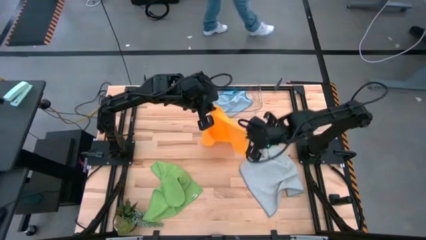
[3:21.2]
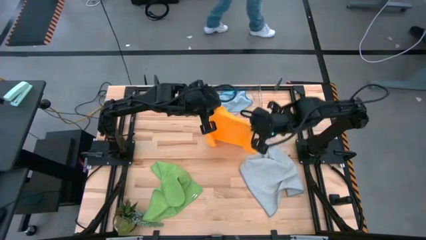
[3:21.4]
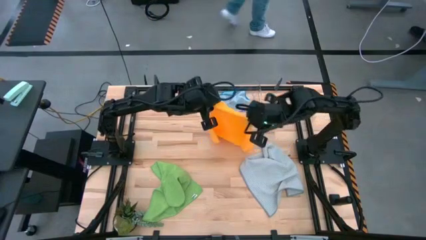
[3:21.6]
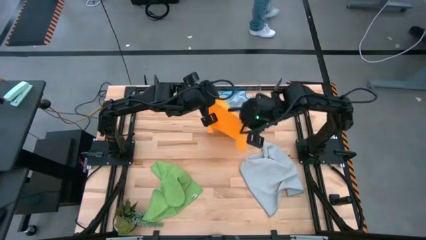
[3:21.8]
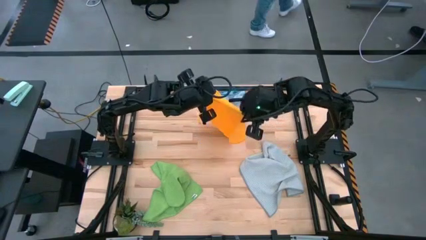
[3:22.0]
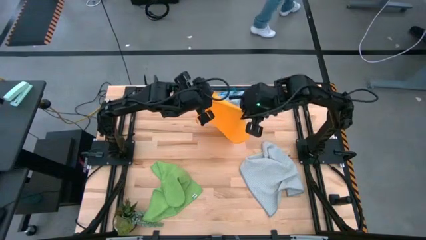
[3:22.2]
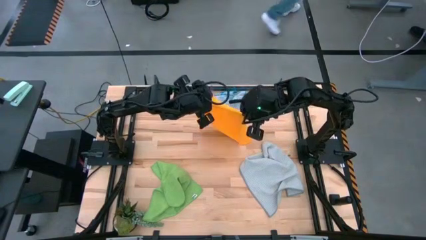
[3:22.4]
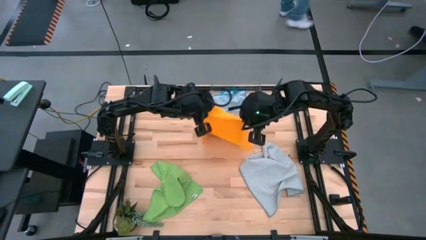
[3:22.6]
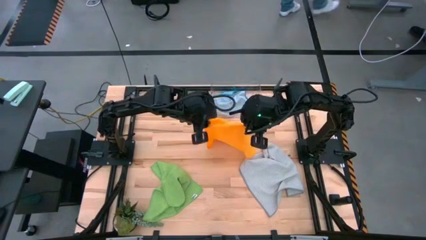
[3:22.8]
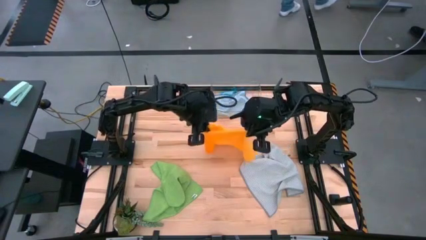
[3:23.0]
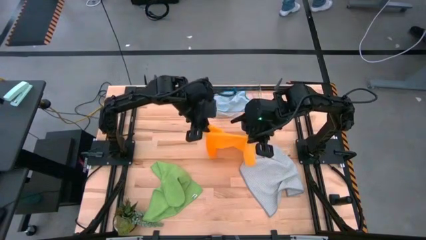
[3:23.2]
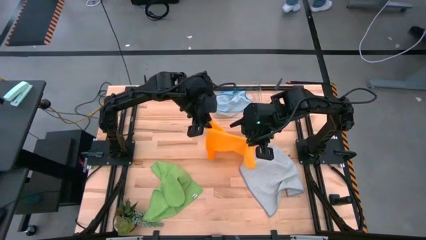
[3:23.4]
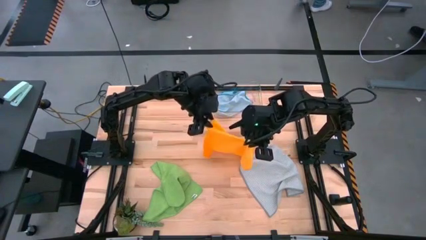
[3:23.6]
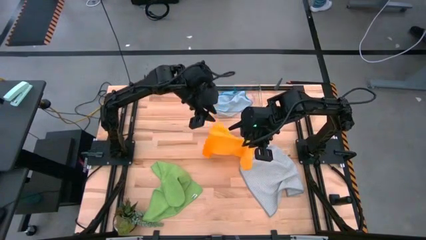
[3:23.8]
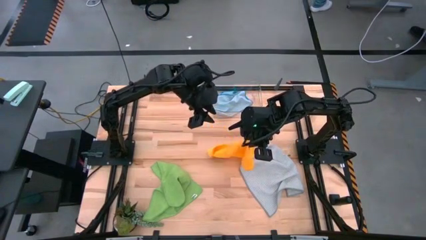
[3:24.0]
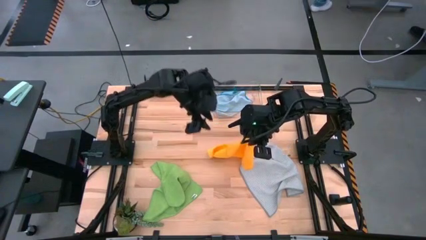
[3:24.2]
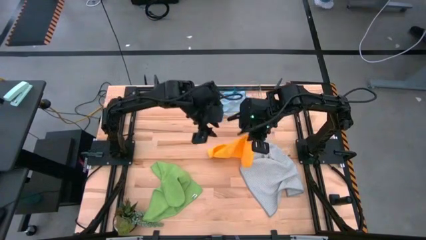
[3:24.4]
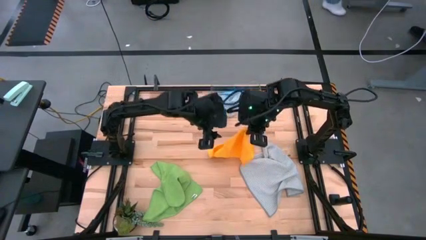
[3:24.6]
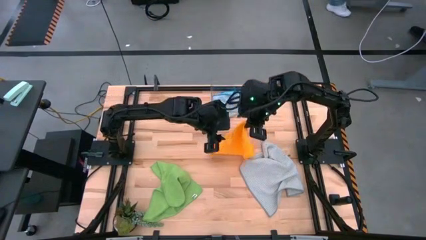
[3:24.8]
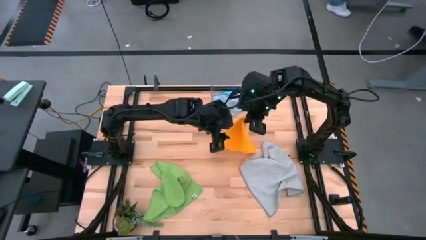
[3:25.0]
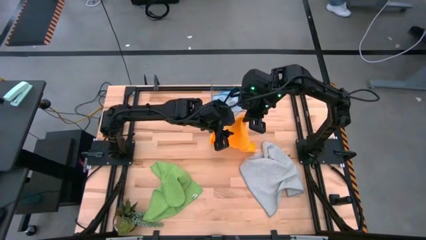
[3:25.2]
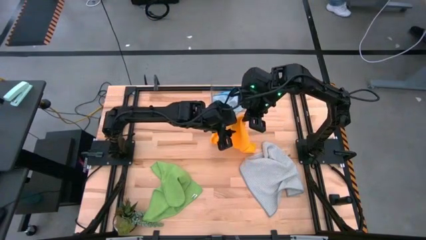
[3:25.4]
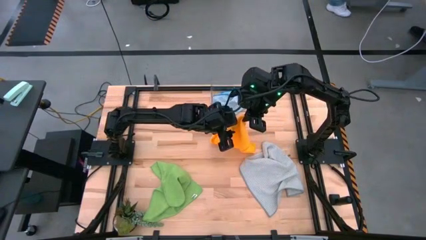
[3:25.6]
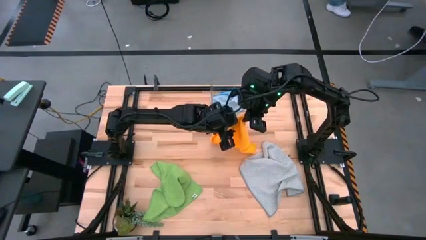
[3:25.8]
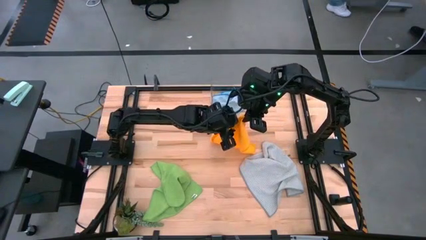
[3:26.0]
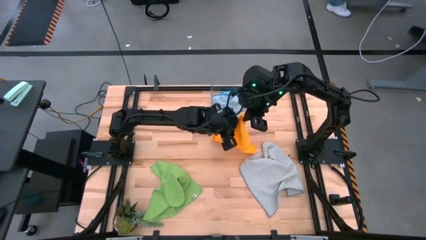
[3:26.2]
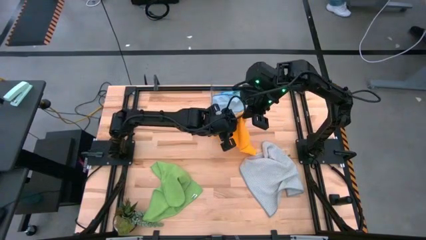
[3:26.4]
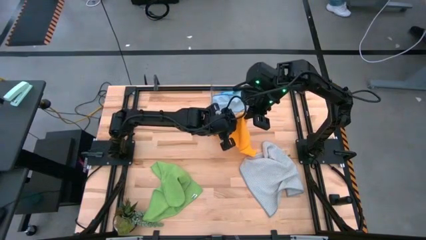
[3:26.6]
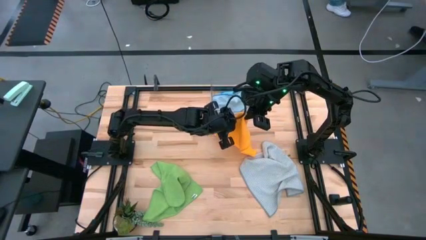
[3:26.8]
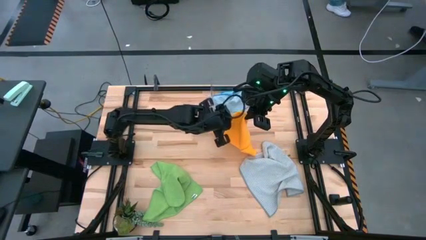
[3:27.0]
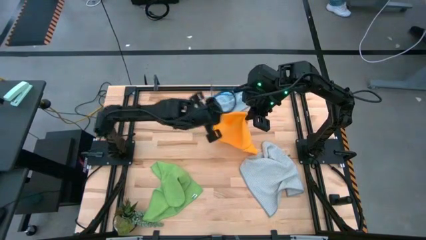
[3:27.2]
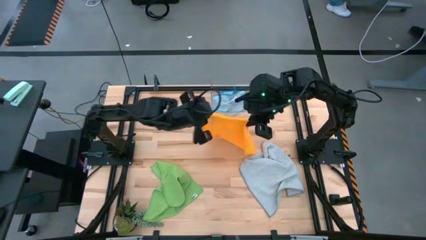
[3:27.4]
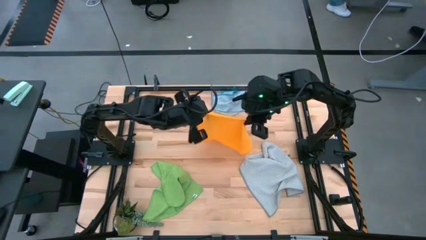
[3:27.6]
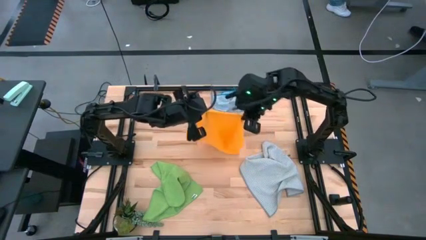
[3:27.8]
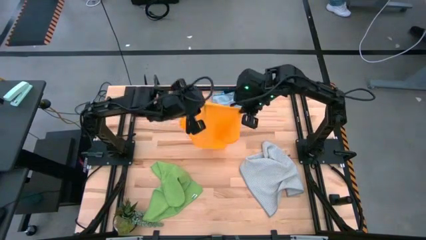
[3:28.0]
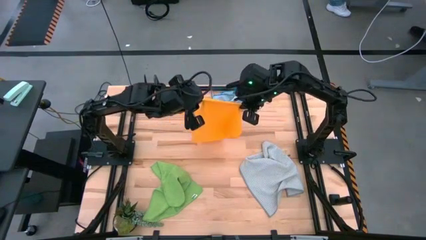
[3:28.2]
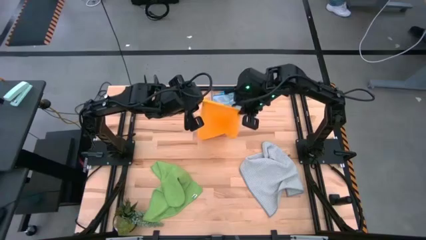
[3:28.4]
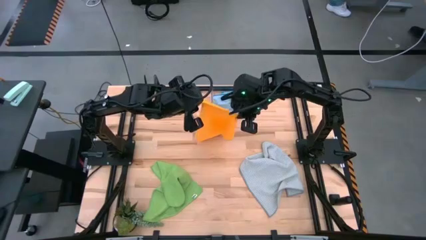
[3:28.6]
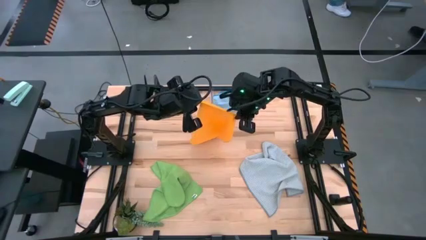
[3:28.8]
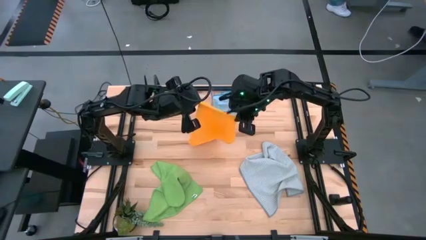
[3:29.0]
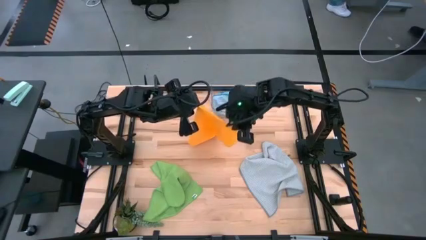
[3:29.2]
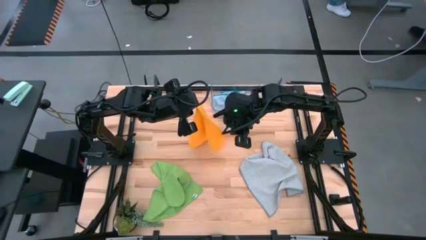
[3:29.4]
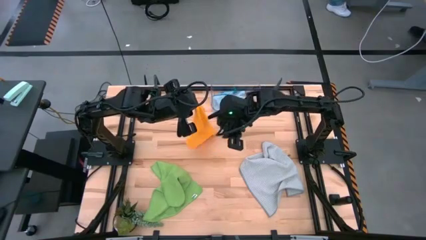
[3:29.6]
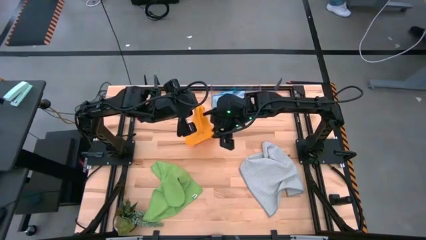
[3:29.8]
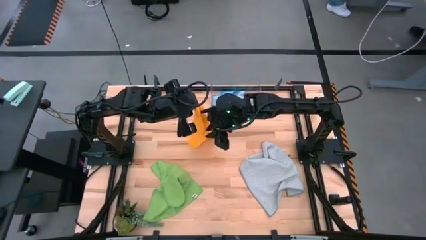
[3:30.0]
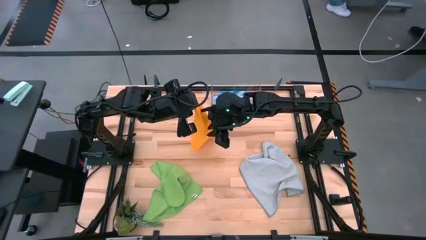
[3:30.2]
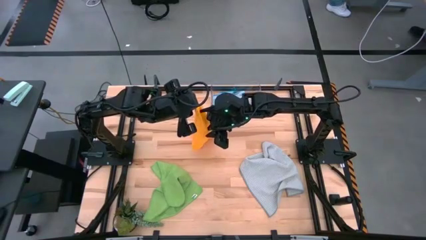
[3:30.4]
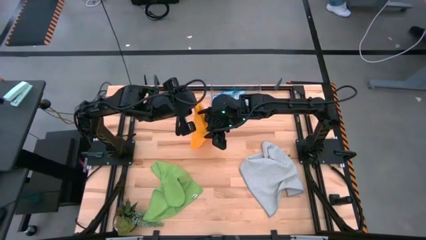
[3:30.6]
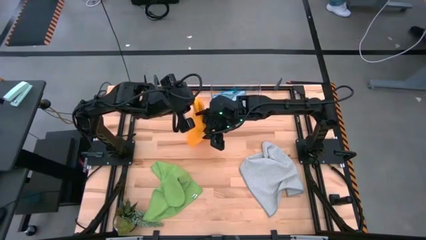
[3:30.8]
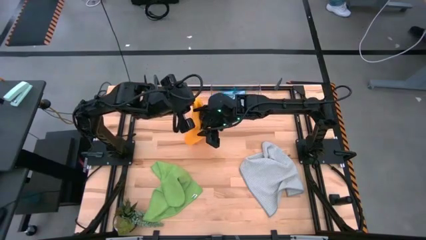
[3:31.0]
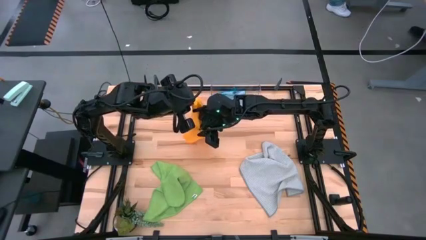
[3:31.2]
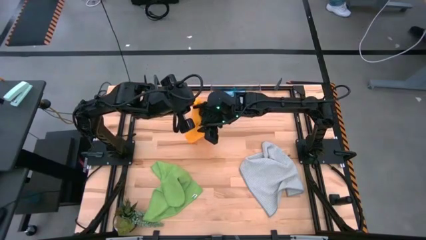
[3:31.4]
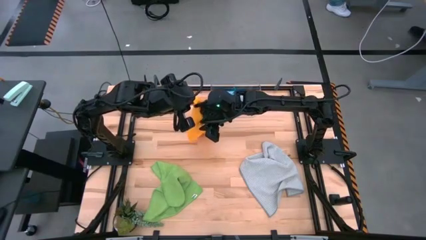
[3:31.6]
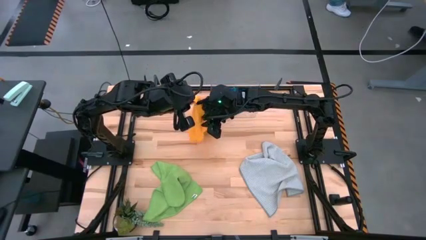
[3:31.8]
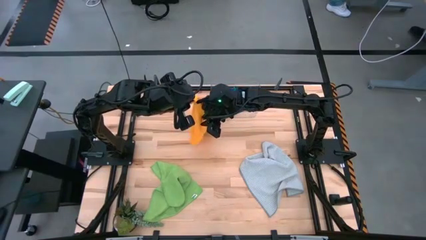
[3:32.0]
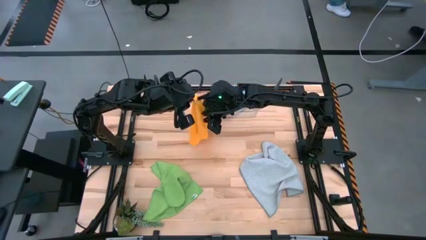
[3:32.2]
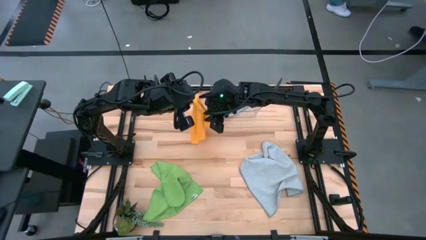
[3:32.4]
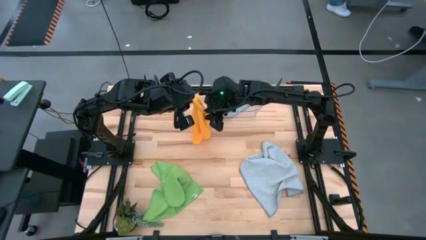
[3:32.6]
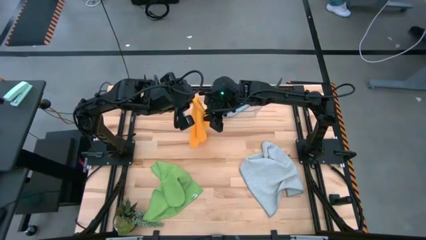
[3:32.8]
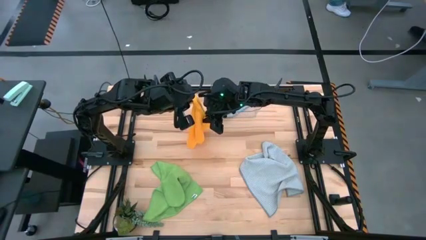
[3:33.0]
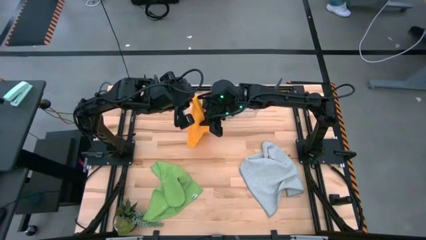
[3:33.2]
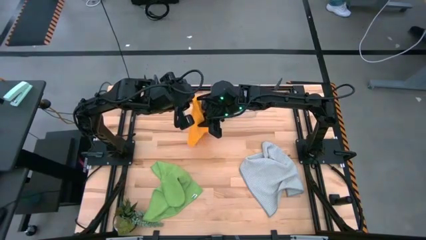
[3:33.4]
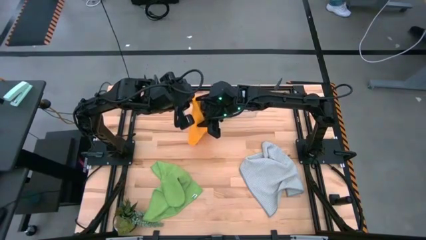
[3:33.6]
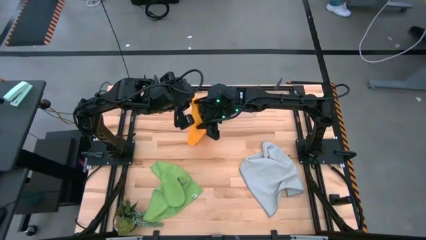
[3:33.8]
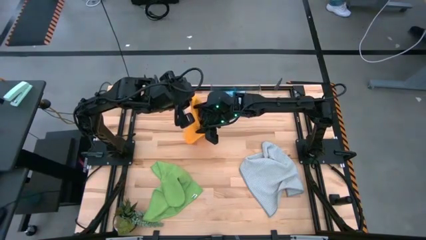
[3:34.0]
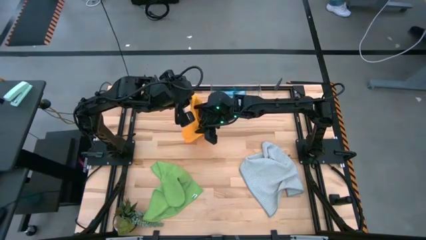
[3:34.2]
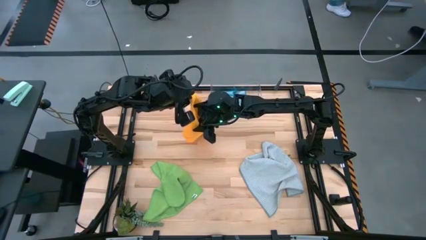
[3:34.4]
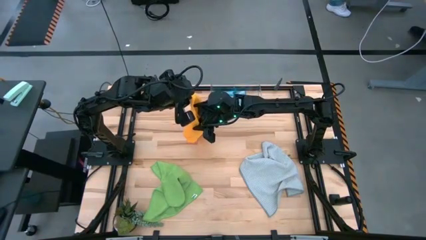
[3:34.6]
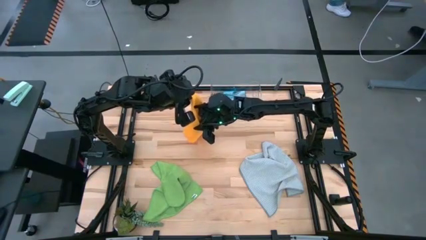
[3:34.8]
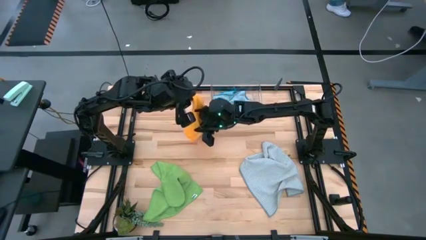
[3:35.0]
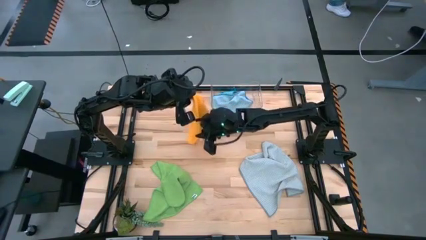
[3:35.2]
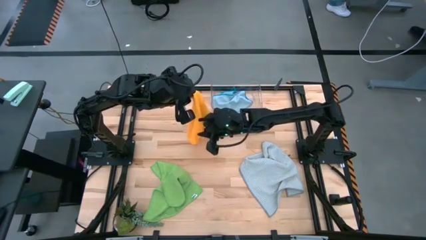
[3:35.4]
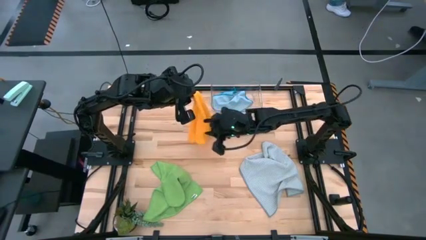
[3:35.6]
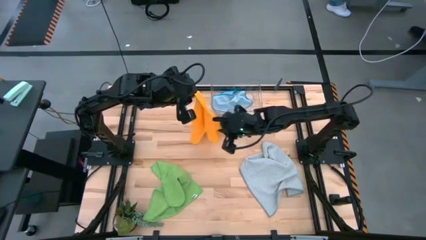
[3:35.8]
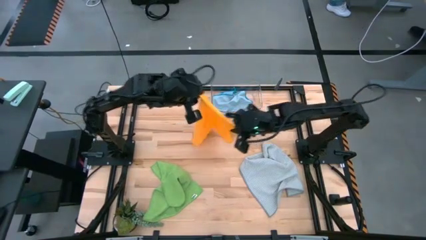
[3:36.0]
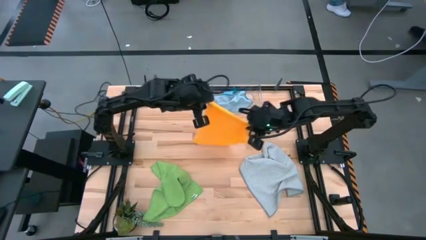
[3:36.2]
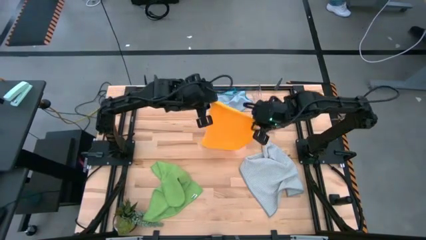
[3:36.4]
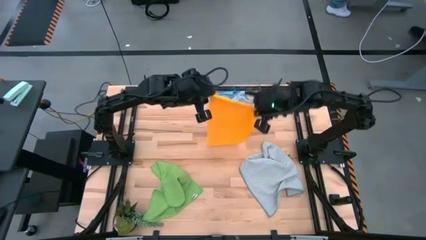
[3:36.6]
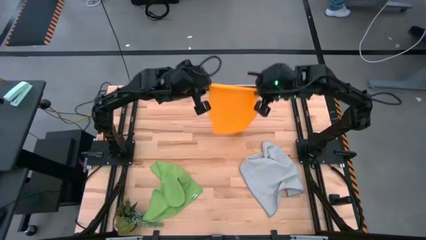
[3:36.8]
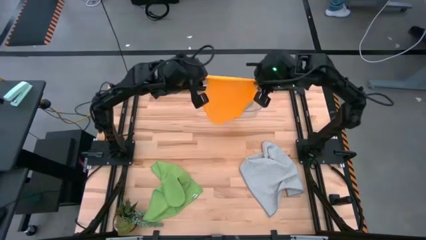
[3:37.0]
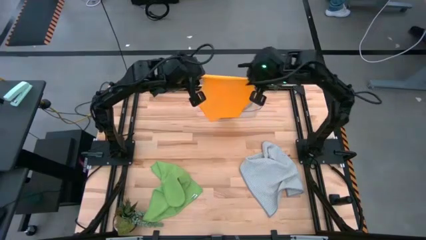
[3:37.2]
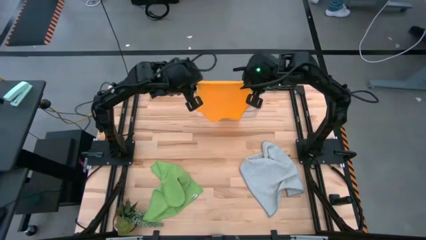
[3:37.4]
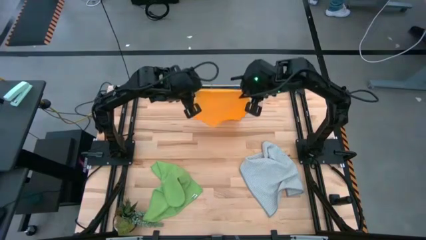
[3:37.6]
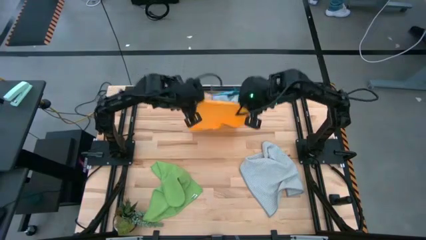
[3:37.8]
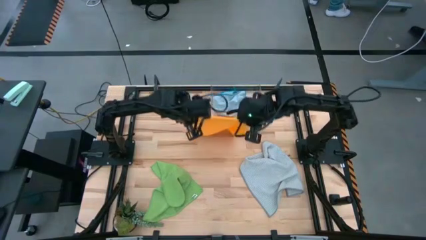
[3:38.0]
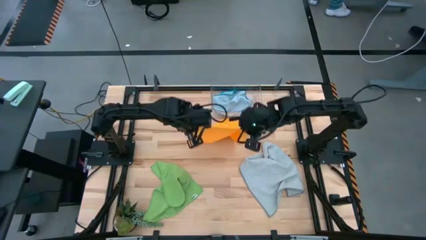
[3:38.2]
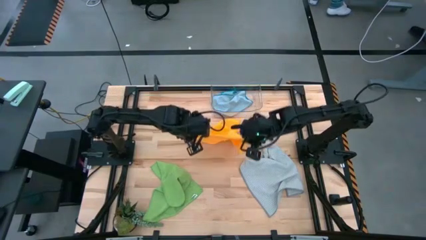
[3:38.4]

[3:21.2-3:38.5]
Task: Fold microfiber towels
Fold the orange microfiber cloth
